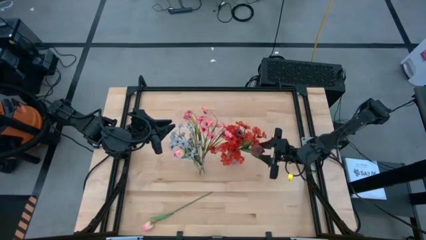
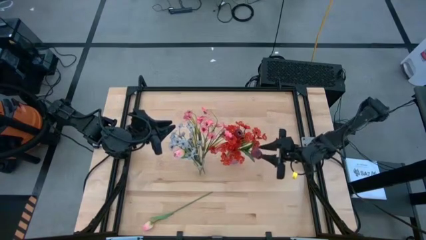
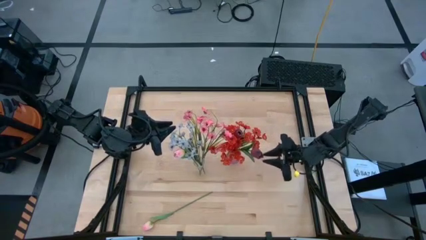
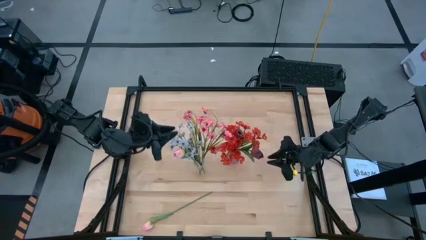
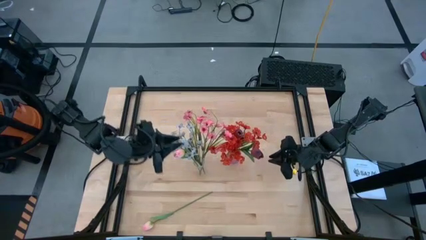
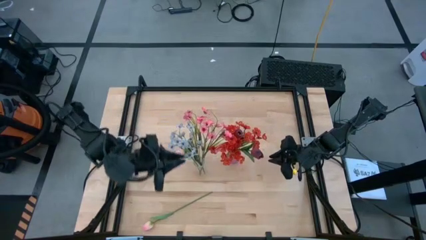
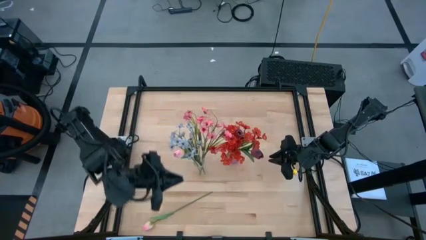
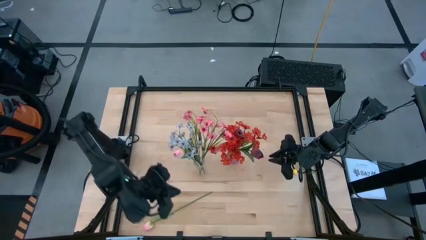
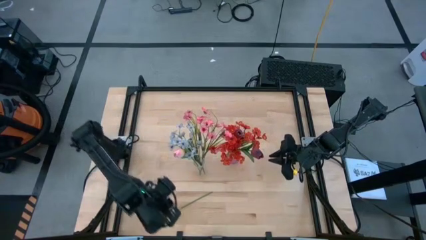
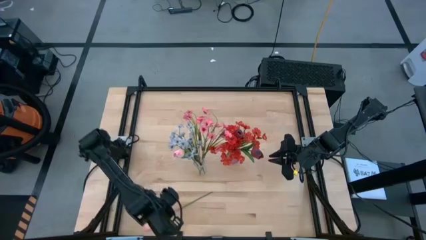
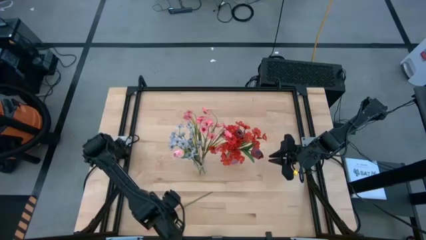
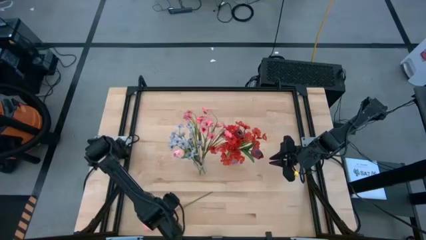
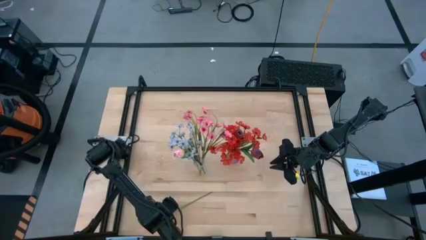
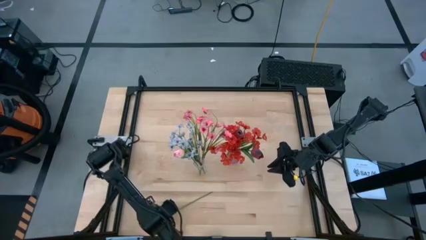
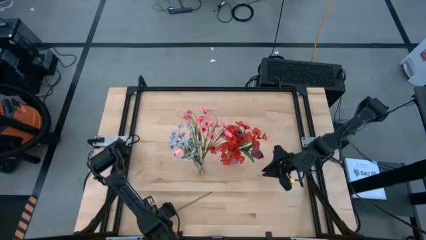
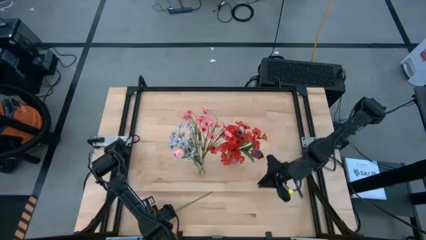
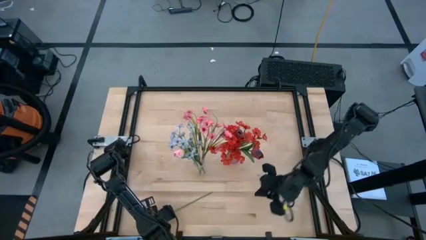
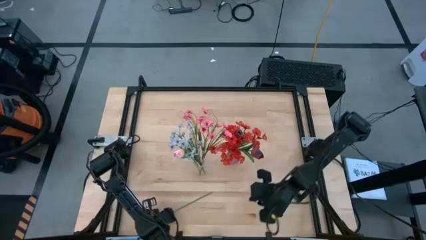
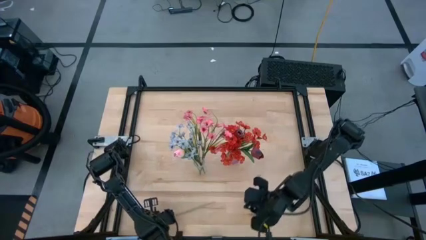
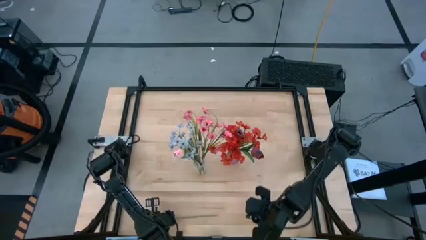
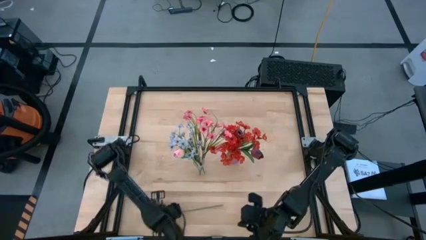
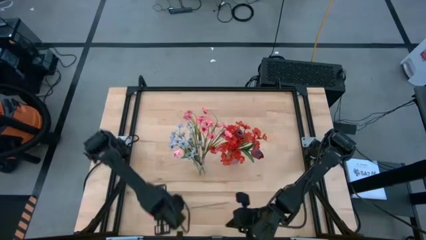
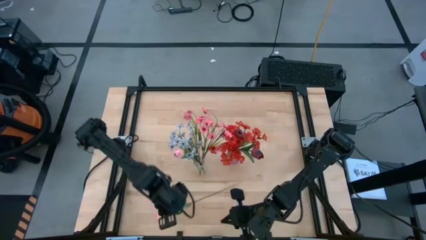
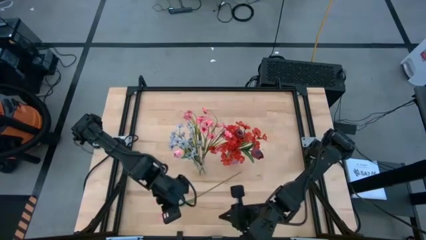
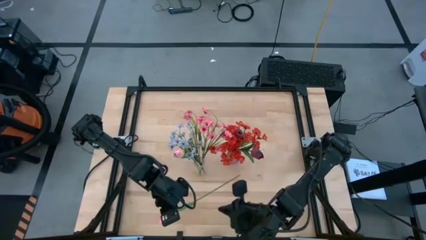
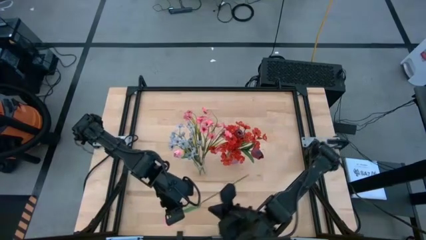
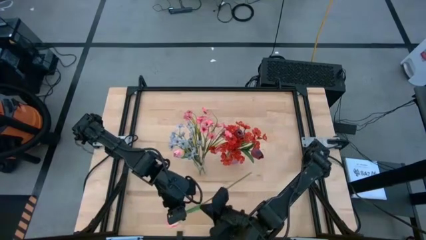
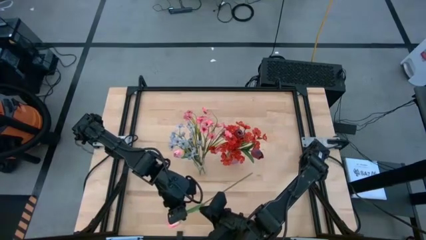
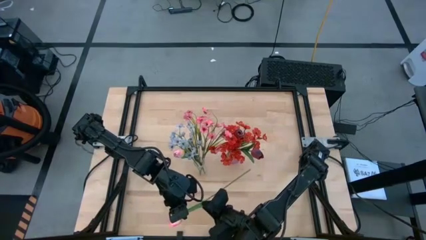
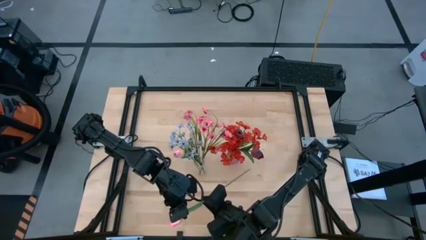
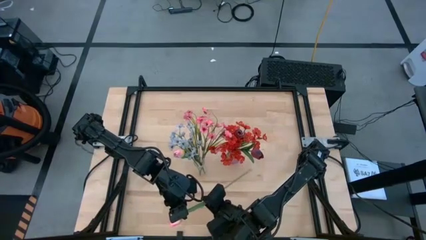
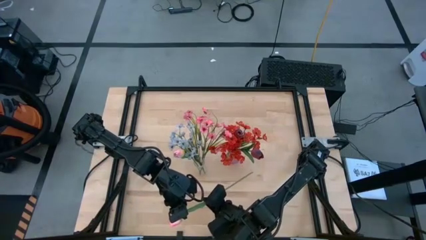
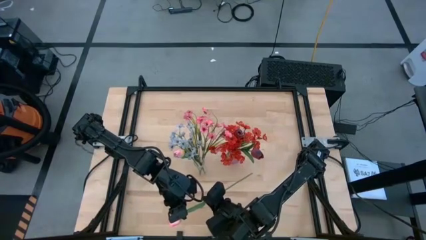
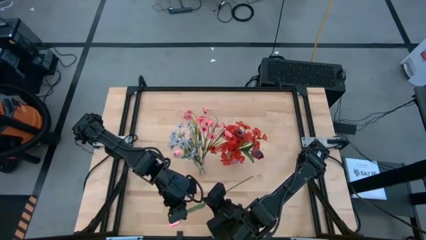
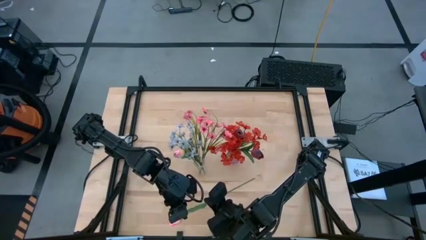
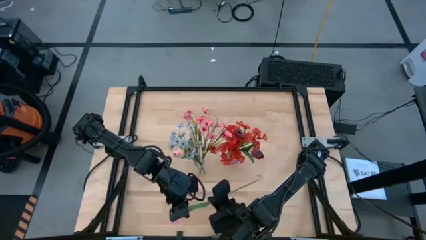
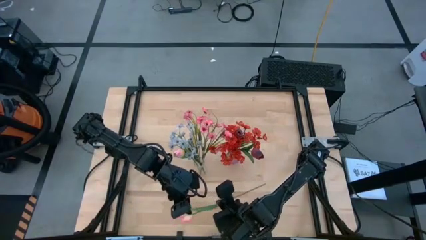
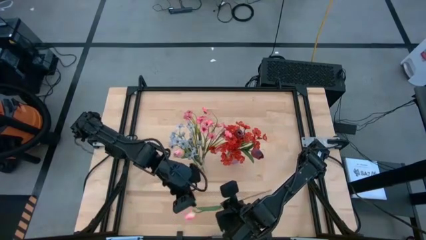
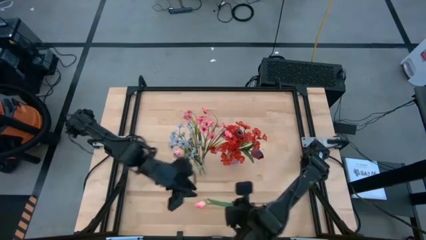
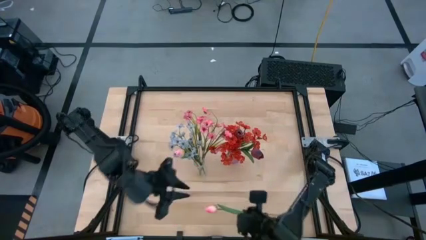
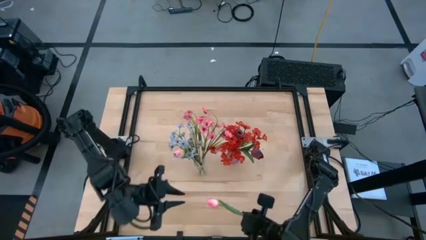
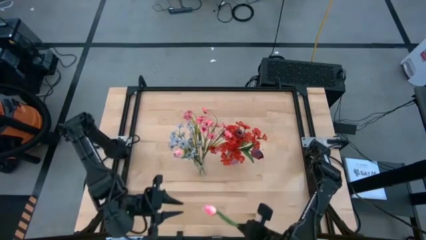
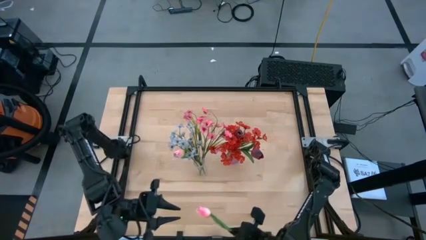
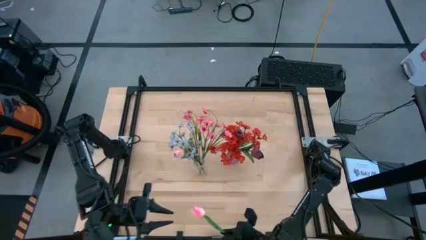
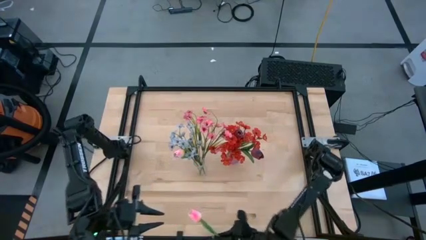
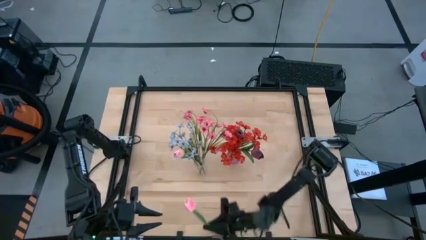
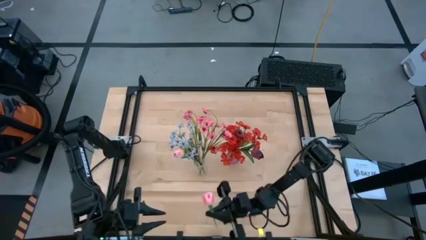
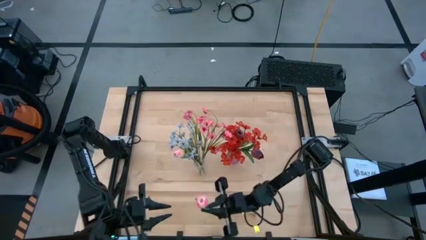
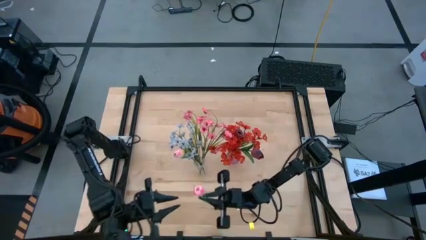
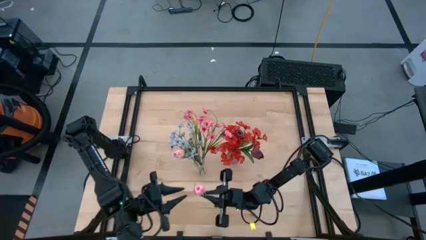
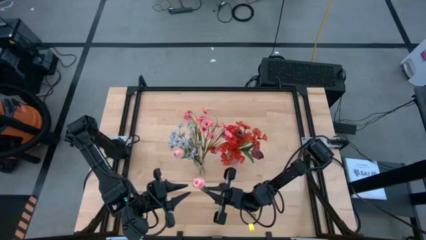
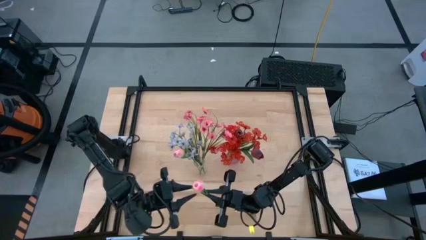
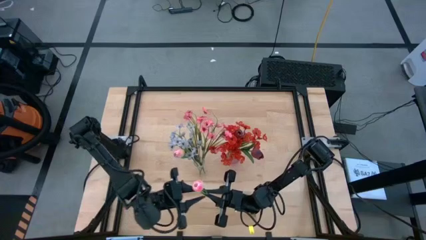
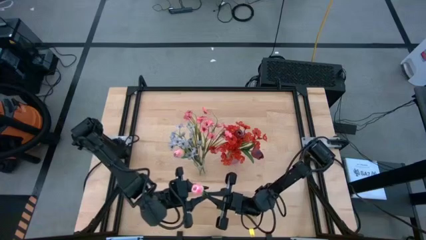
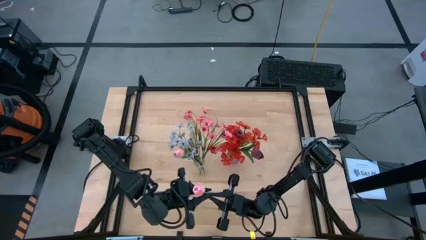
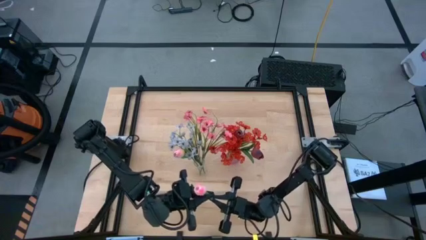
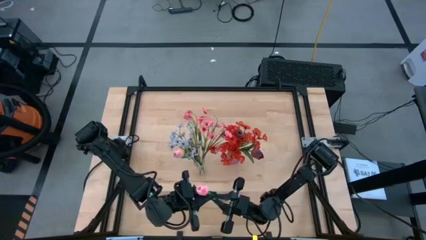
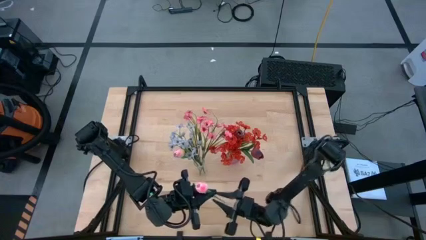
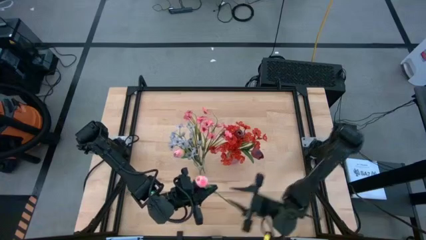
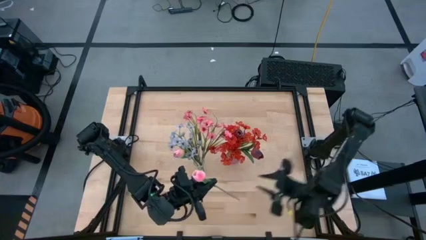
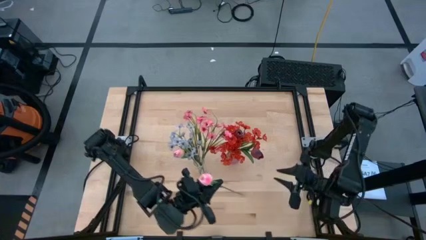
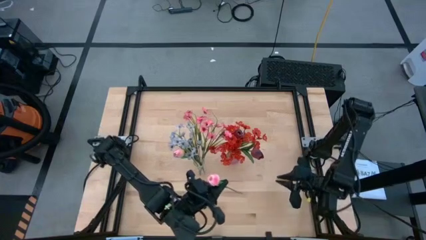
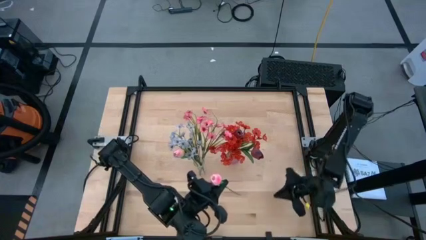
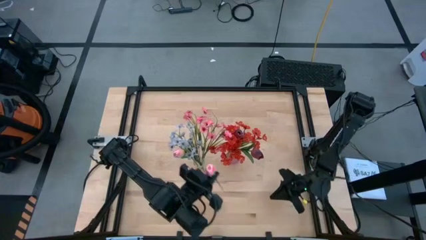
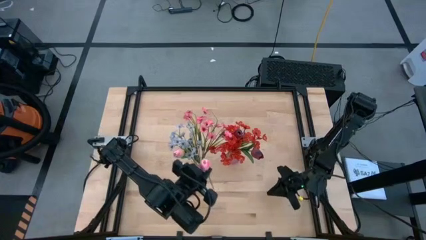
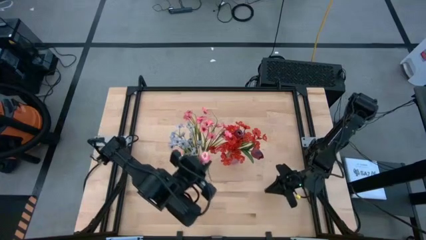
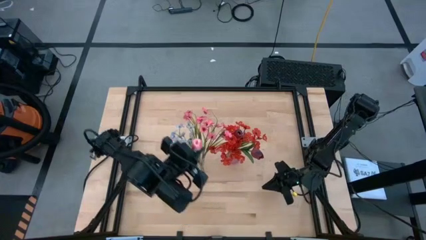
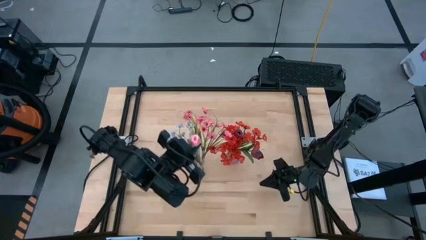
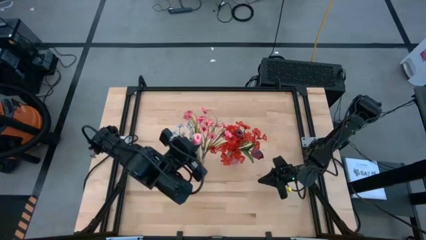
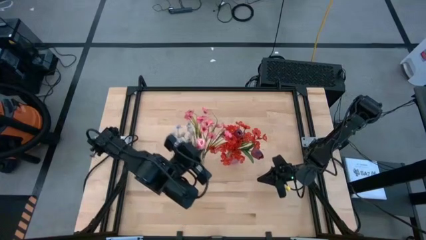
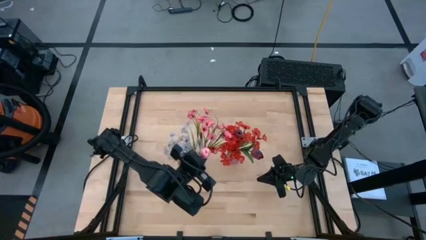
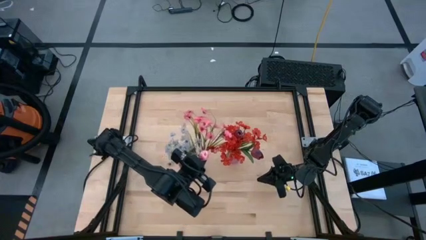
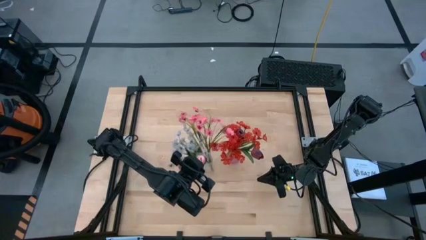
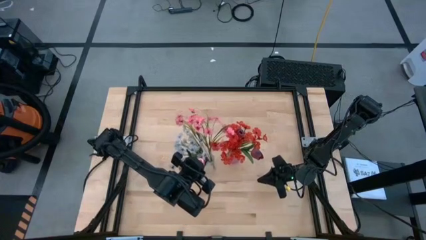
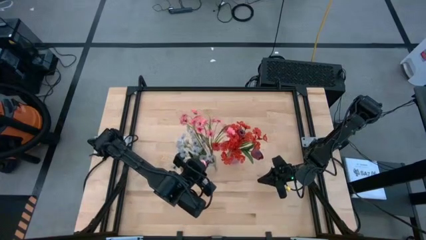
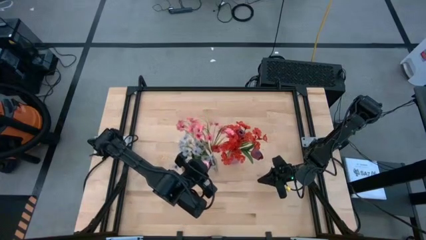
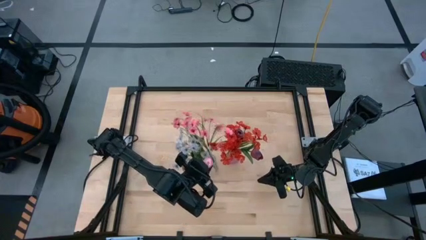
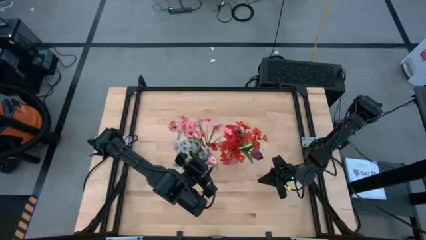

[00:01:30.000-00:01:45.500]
Task: Sort flowers into vase by color
Put the pink flower into the transparent vase
